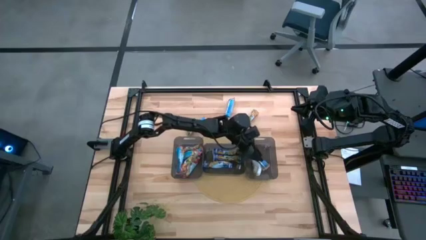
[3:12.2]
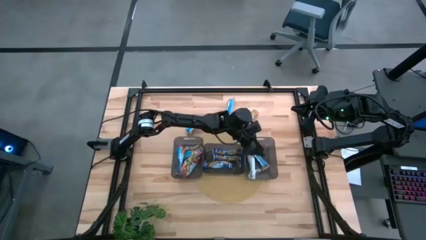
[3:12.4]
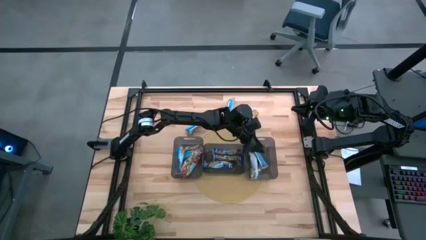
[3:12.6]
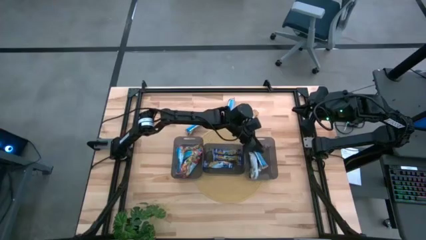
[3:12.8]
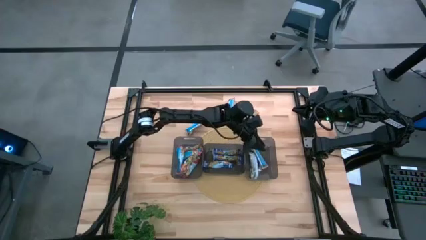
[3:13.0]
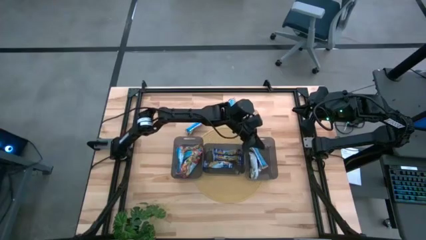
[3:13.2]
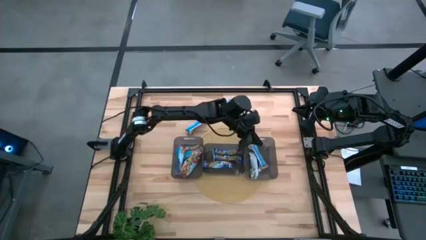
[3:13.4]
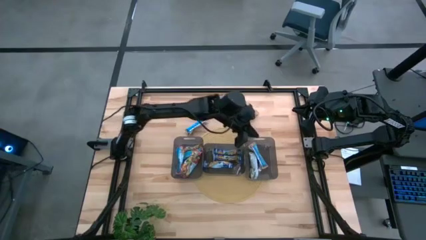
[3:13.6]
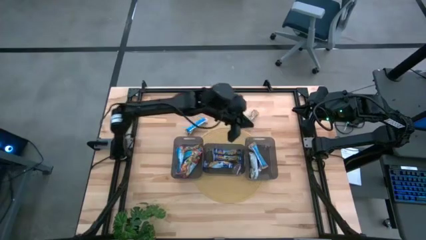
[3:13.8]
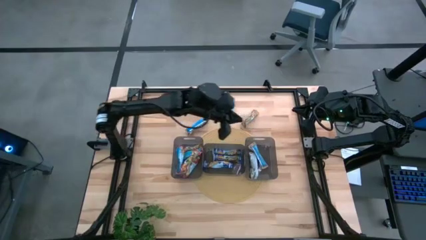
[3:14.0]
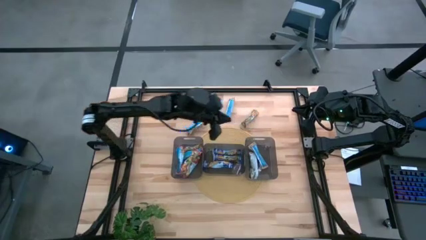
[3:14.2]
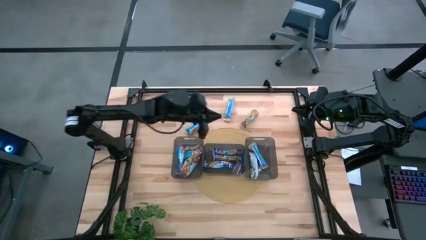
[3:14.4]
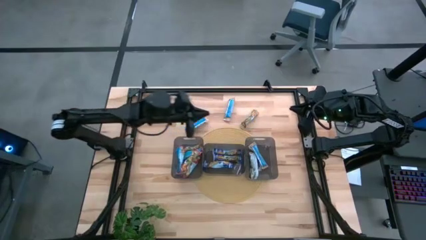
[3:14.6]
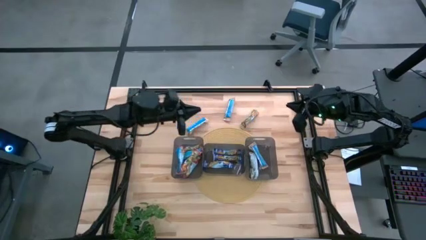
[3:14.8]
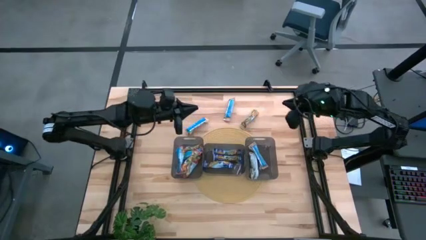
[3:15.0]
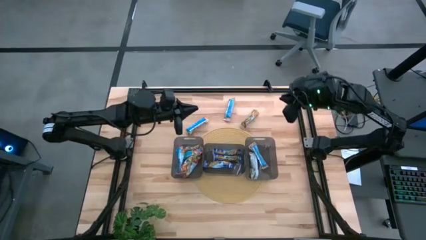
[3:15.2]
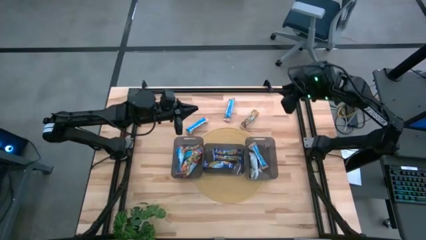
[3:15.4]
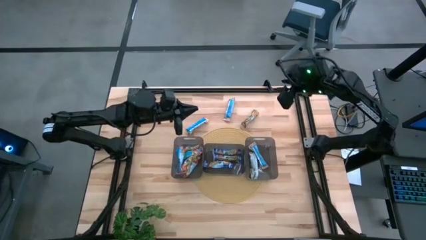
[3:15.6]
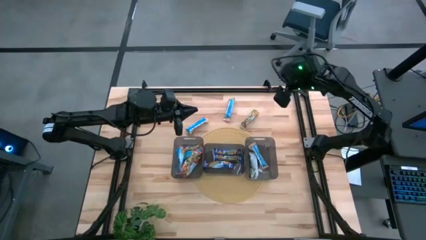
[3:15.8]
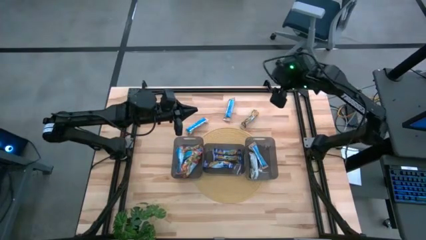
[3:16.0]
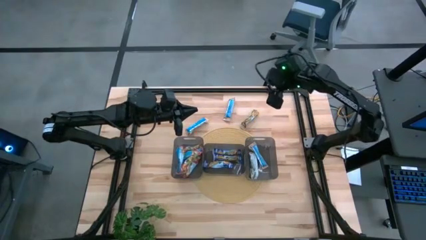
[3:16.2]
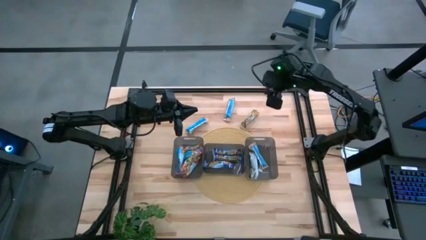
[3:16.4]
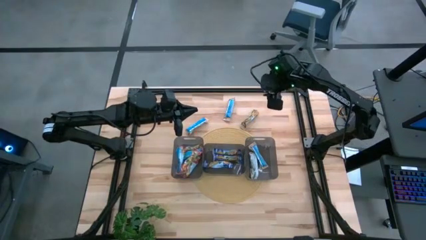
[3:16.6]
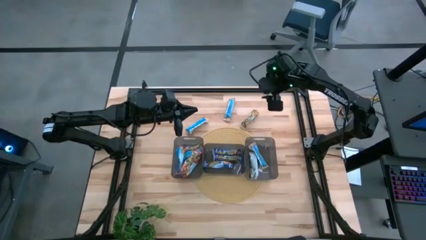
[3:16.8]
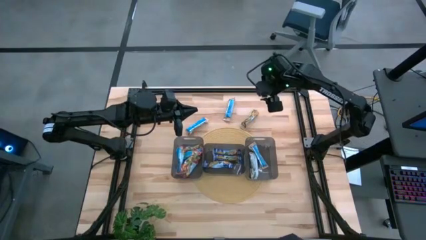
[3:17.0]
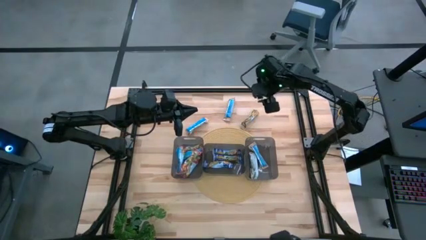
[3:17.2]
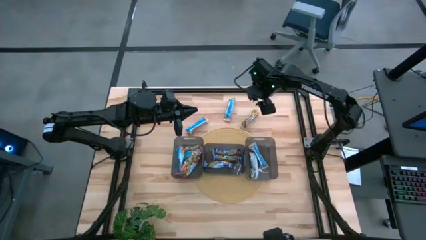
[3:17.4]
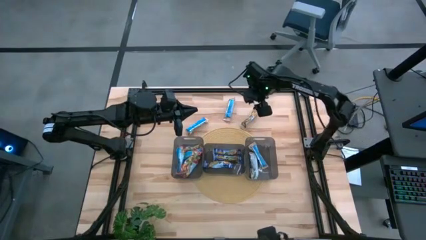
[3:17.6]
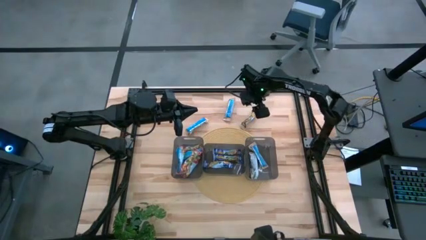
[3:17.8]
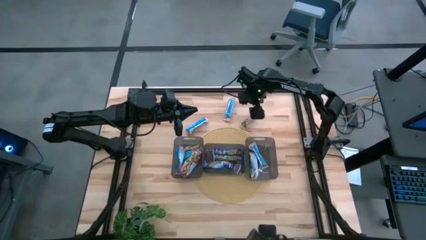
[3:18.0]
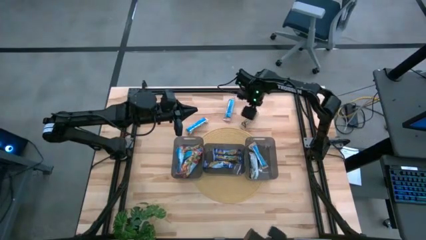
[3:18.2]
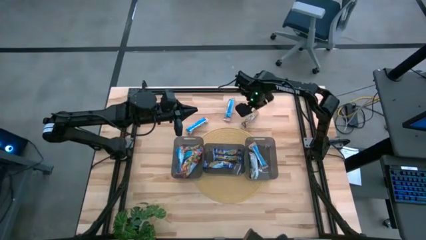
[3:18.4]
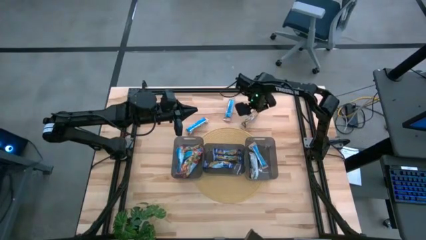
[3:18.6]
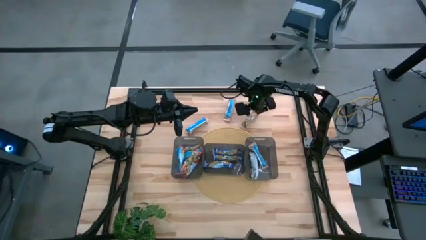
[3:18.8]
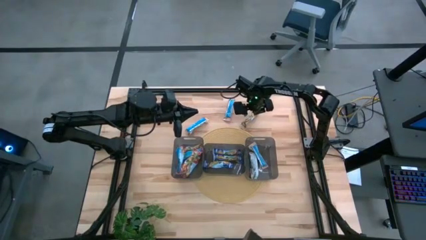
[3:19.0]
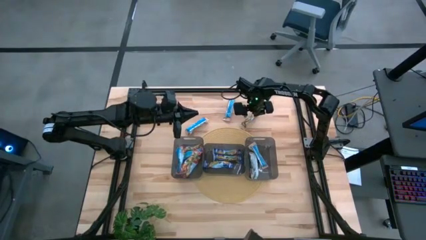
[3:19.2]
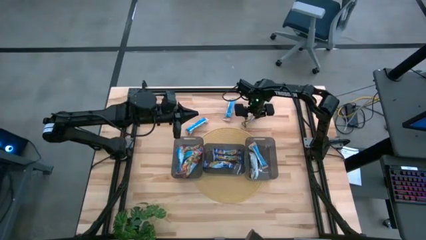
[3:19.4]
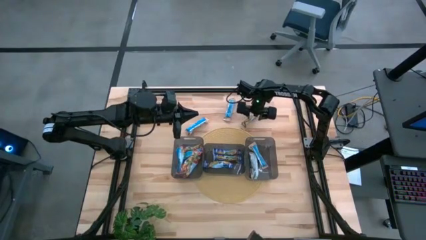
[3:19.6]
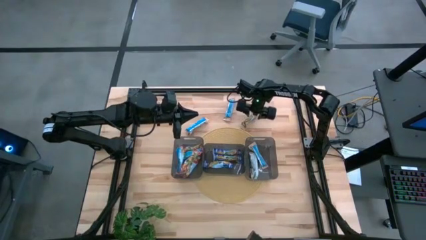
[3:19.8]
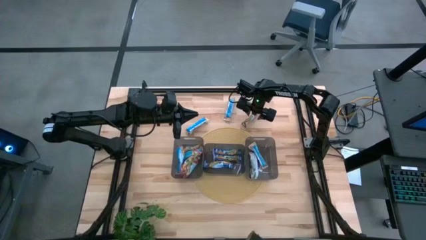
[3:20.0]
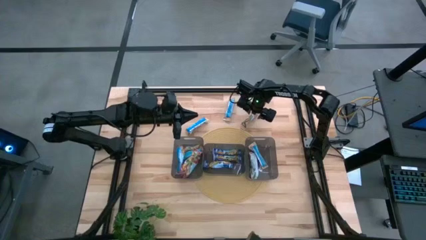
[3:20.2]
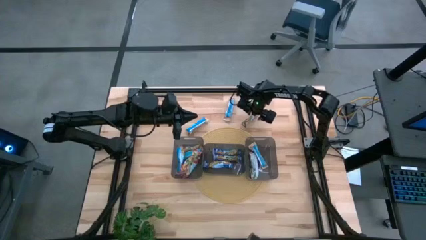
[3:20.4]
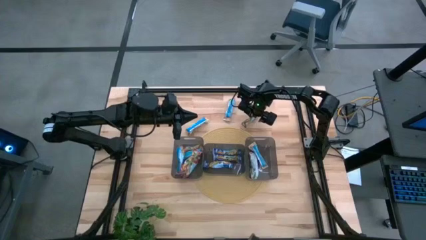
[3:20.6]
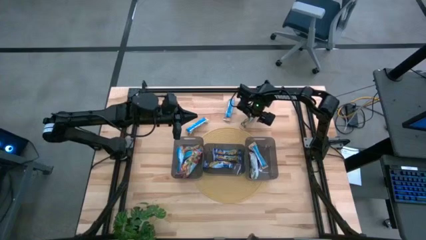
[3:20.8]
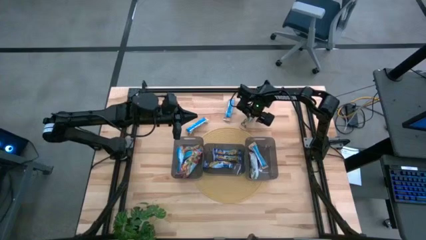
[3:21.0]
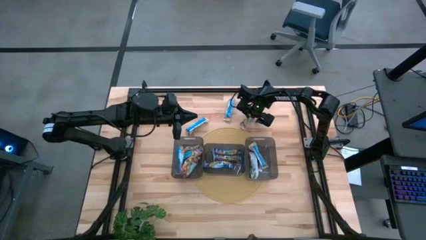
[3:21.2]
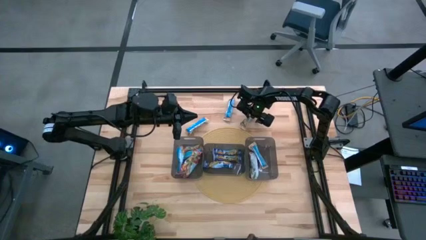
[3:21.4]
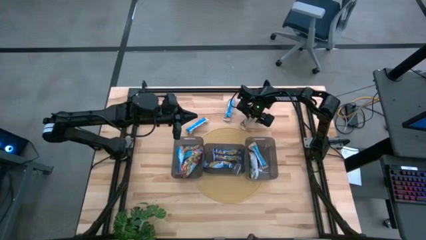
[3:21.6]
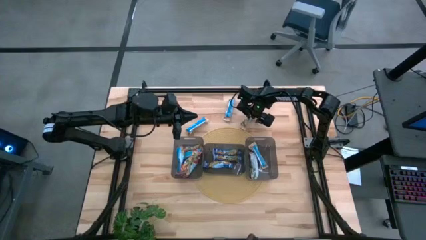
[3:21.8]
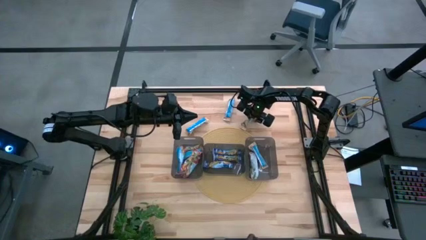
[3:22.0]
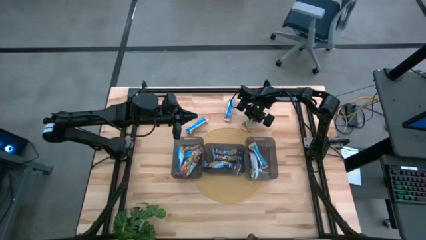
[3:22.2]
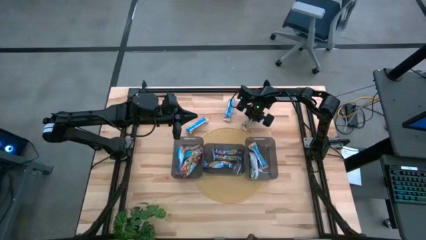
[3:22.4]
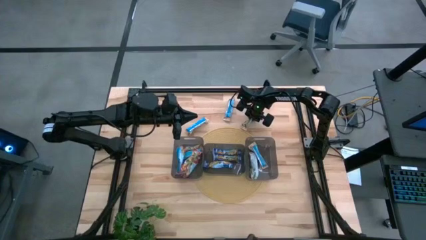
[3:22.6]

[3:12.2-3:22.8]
Task: Pick and place Granola Bars by type
Put the orange granola bar into the right black bin

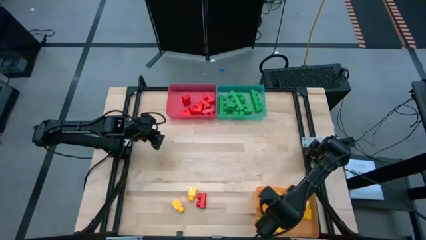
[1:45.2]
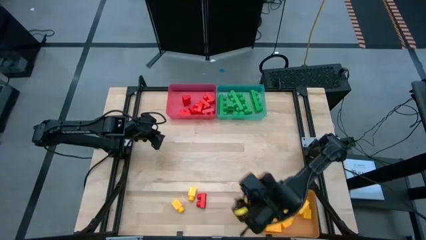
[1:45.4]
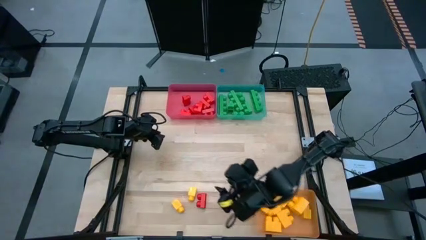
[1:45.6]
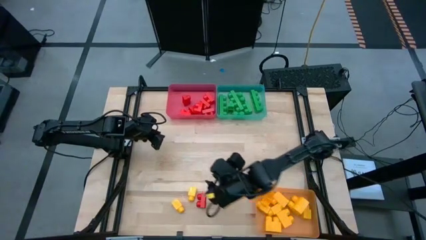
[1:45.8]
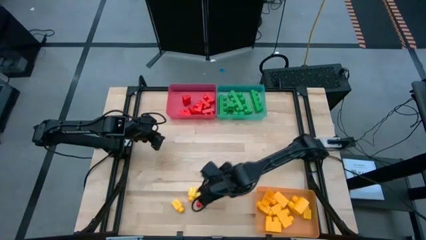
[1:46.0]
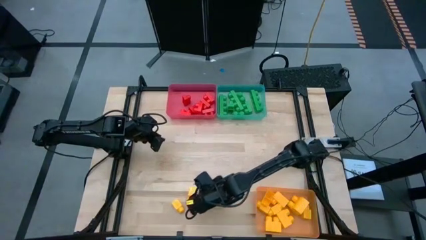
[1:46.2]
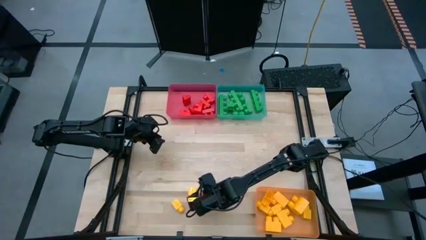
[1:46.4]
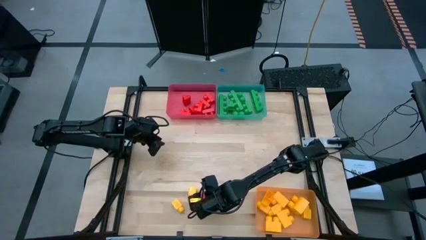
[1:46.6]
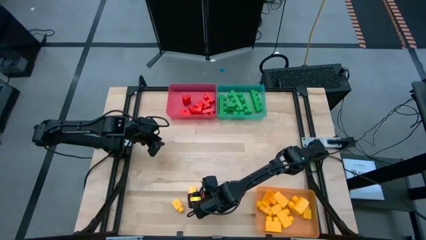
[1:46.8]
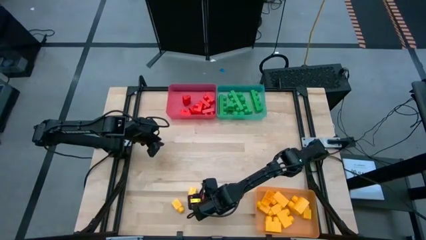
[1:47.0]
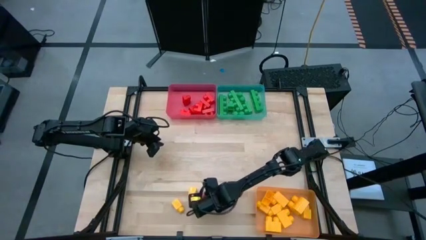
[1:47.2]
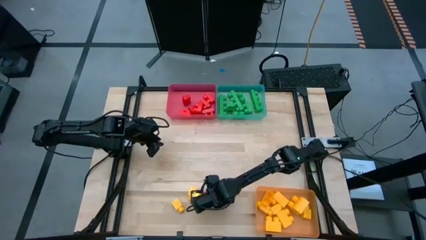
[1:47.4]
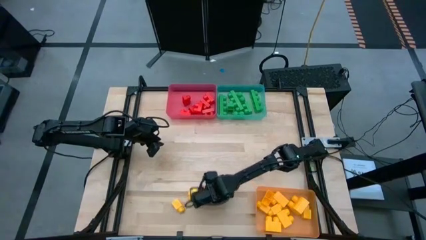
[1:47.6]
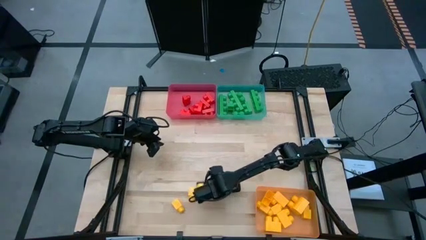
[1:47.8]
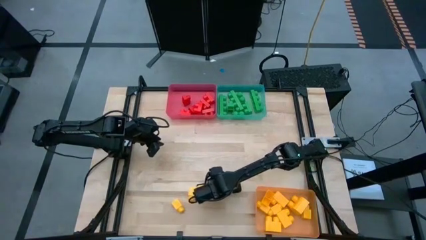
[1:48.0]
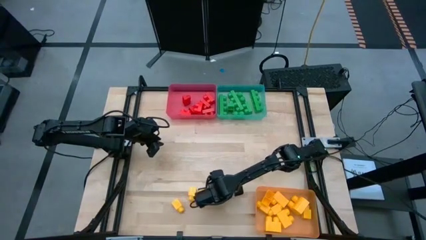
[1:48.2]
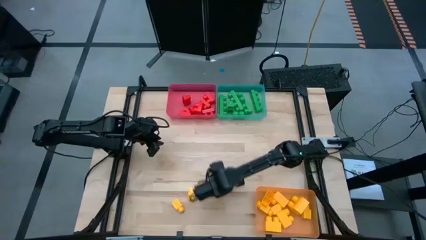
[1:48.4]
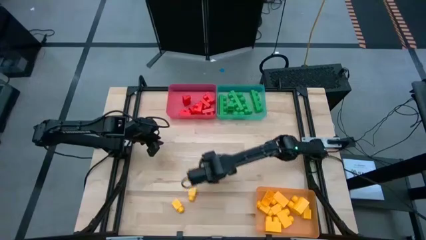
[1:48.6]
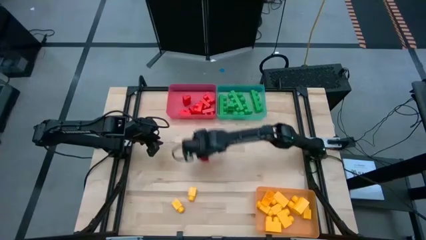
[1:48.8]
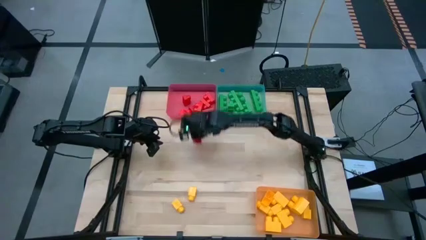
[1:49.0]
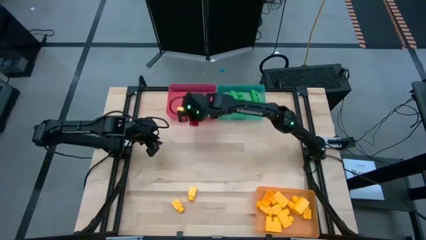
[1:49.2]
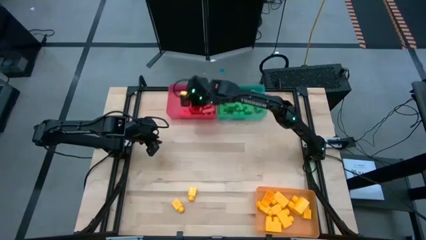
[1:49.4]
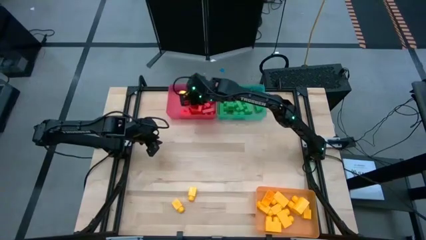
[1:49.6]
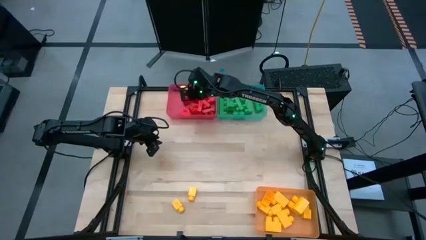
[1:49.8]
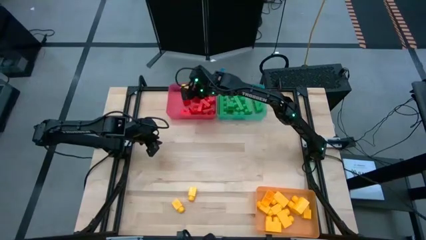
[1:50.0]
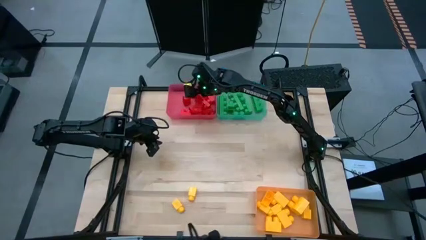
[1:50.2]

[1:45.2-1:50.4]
Task: Sort blocks
Put the red game piece into the red bin

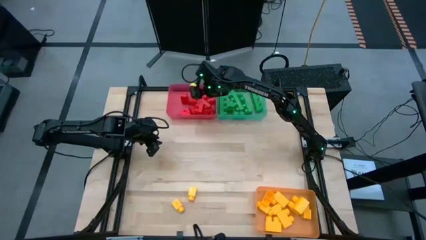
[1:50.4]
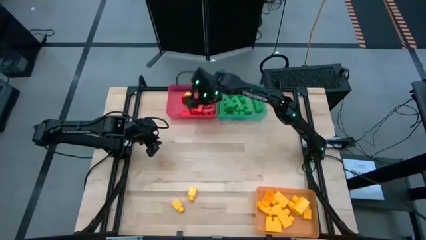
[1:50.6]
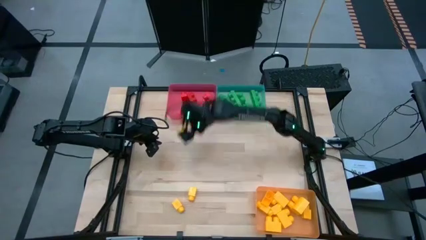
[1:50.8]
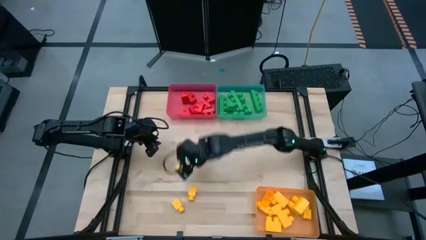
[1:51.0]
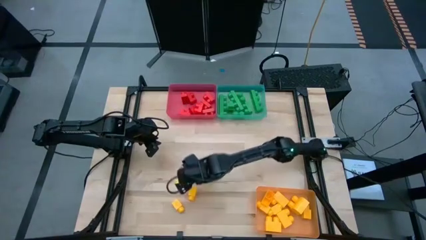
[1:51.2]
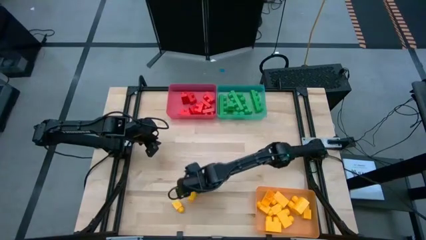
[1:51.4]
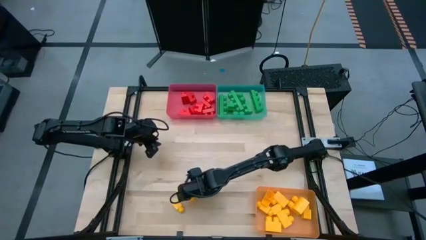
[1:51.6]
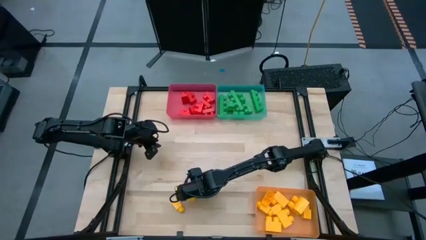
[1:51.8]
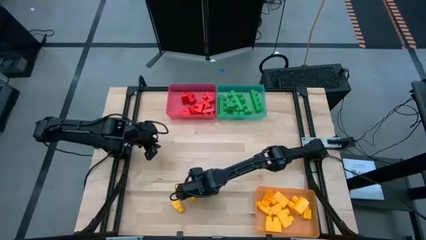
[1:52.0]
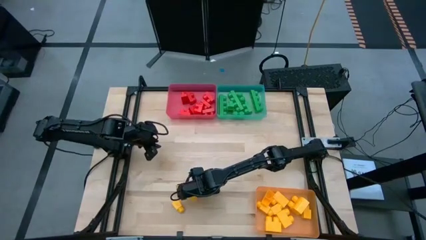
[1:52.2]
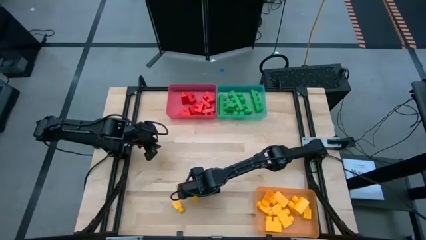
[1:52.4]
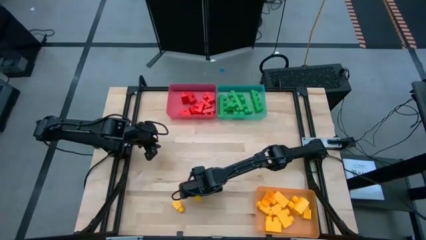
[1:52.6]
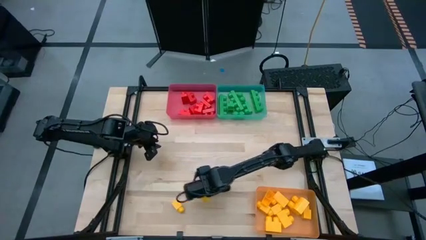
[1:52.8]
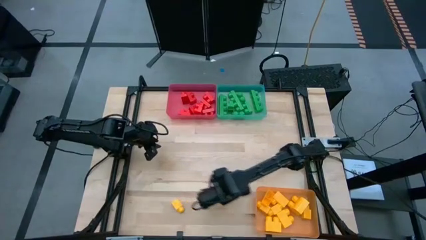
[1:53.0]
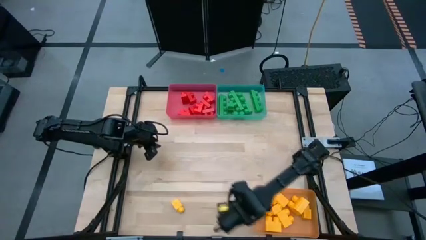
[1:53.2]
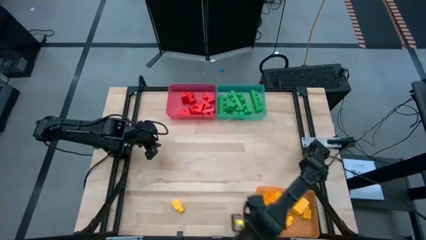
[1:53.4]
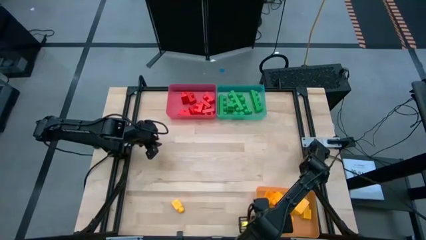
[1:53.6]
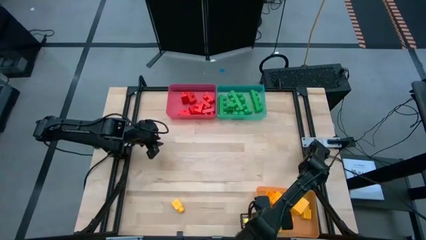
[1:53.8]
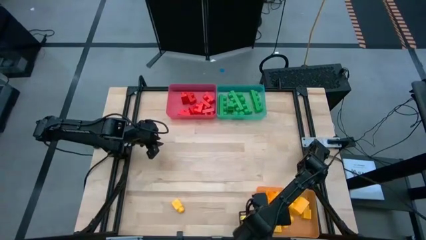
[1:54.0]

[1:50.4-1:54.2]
Put the yellow game piece into the yellow bin
